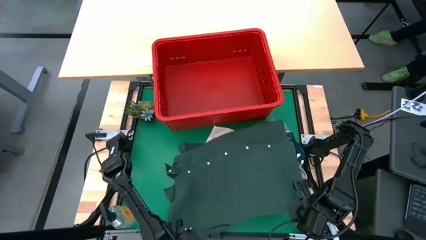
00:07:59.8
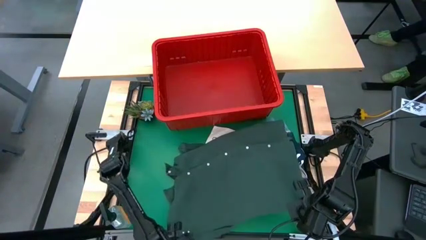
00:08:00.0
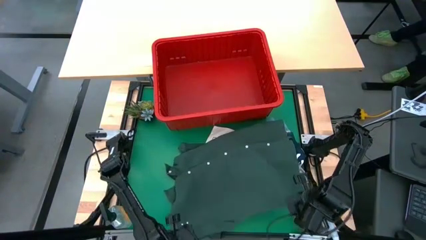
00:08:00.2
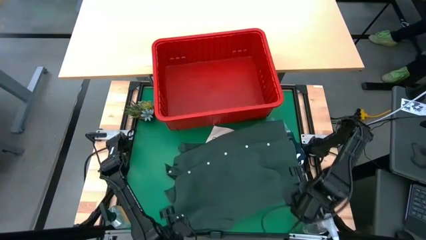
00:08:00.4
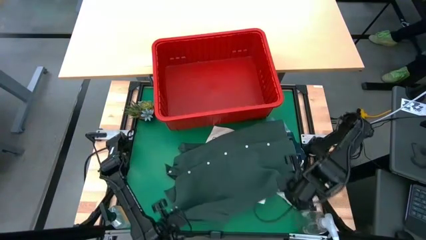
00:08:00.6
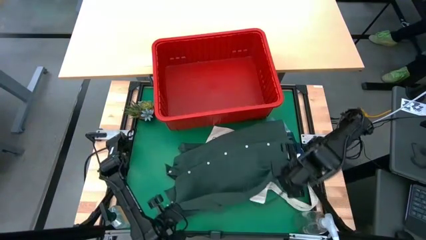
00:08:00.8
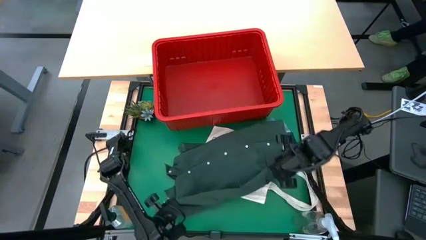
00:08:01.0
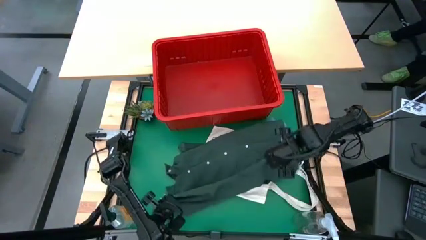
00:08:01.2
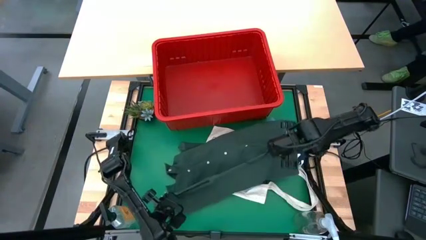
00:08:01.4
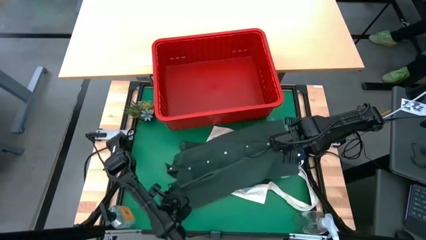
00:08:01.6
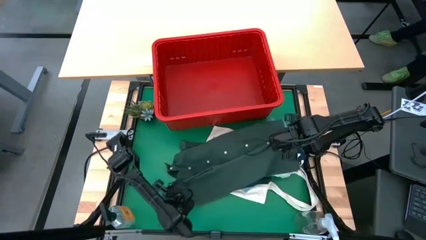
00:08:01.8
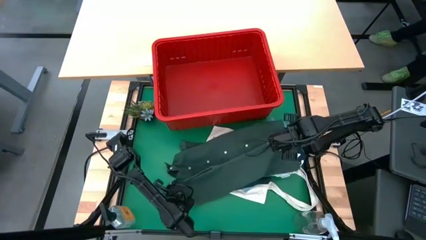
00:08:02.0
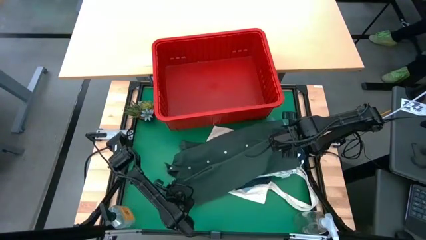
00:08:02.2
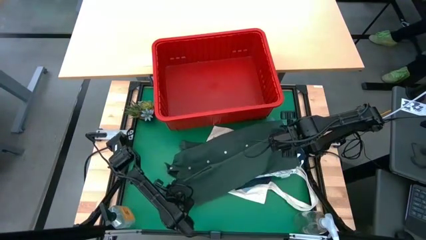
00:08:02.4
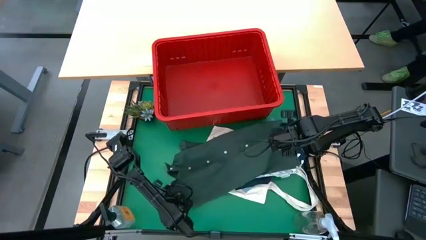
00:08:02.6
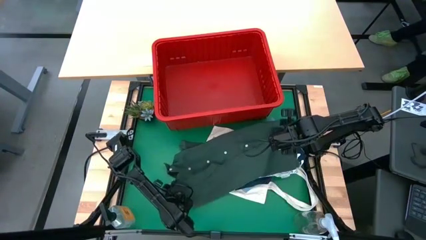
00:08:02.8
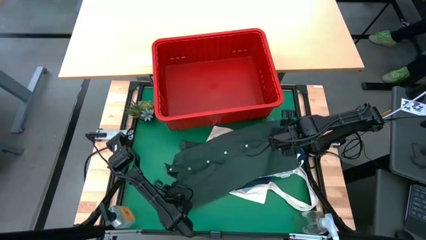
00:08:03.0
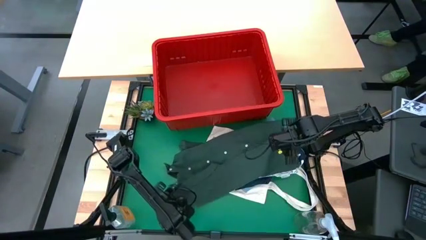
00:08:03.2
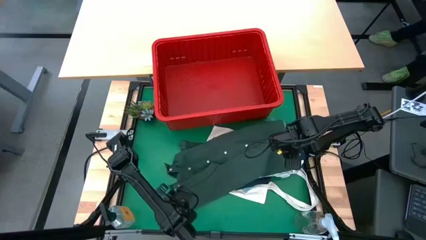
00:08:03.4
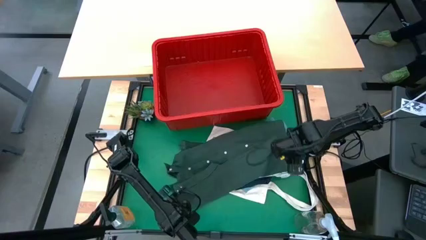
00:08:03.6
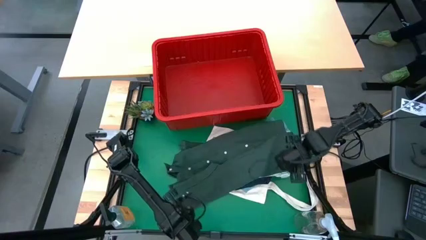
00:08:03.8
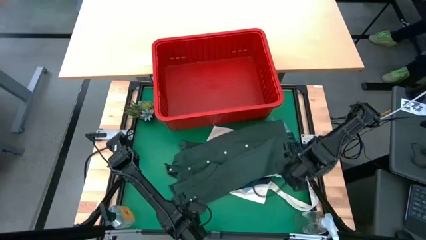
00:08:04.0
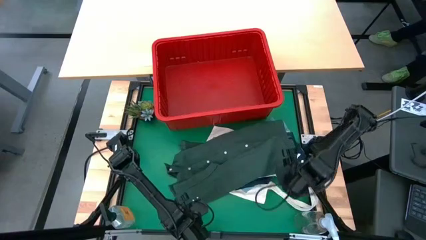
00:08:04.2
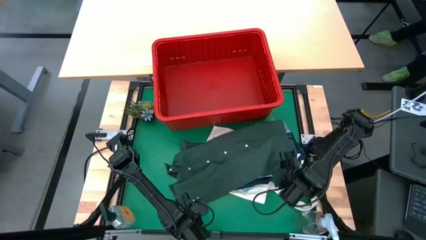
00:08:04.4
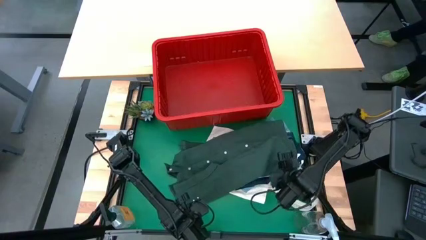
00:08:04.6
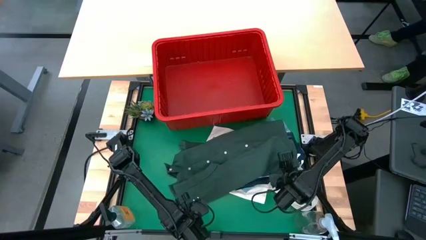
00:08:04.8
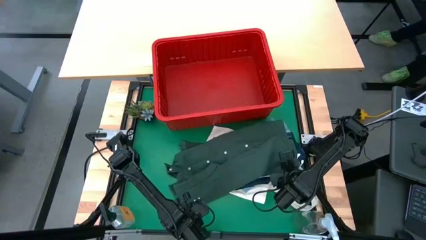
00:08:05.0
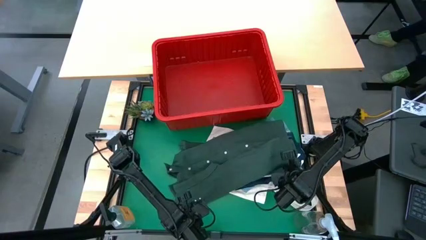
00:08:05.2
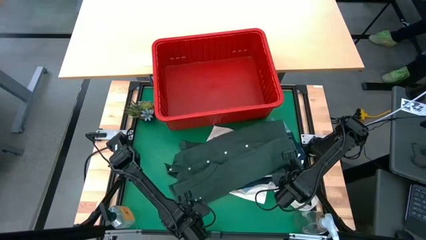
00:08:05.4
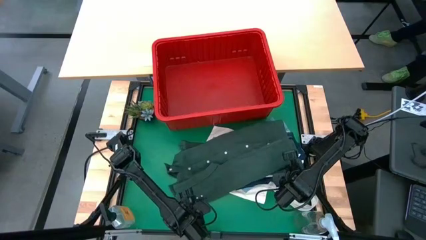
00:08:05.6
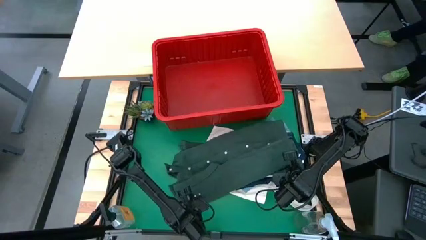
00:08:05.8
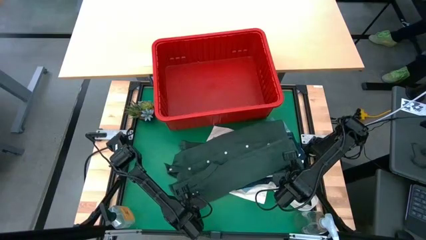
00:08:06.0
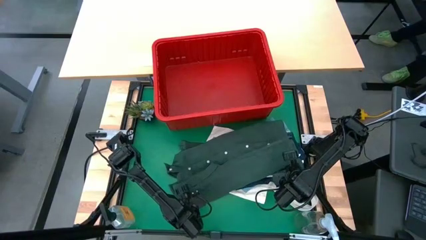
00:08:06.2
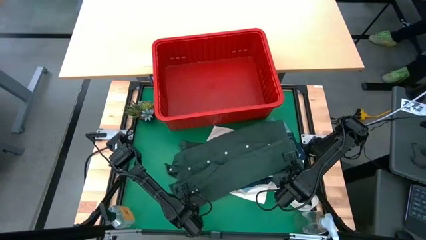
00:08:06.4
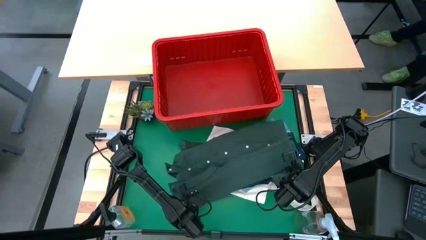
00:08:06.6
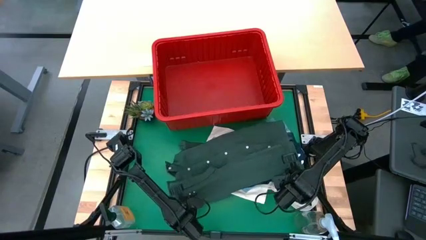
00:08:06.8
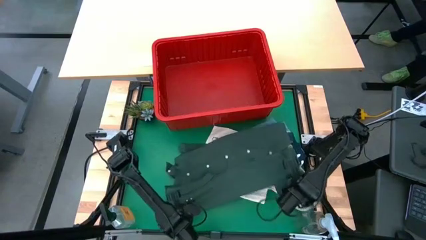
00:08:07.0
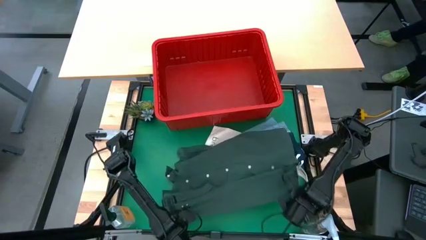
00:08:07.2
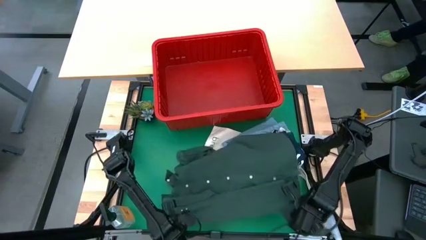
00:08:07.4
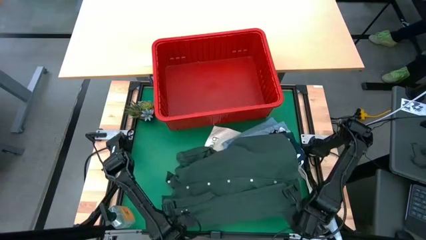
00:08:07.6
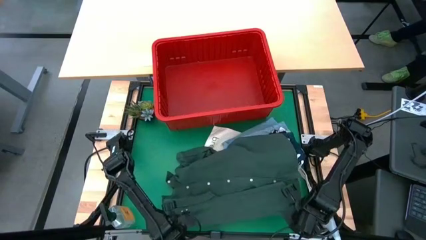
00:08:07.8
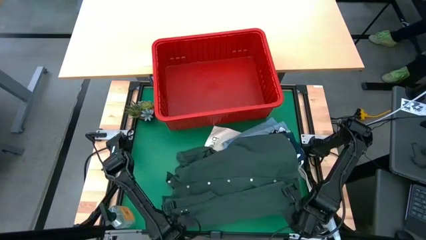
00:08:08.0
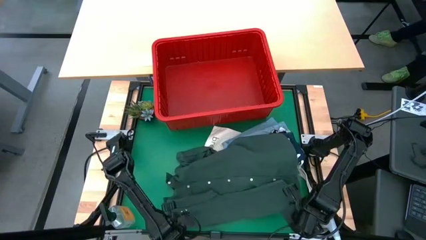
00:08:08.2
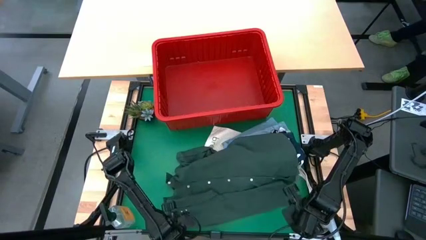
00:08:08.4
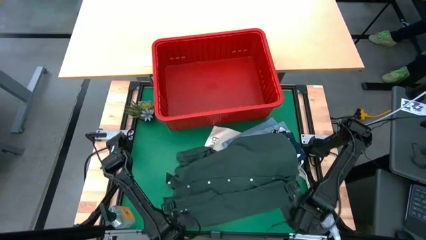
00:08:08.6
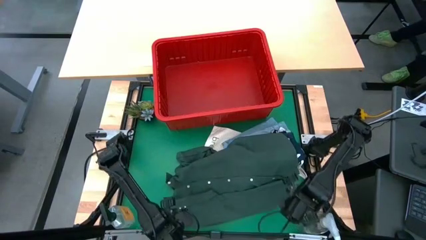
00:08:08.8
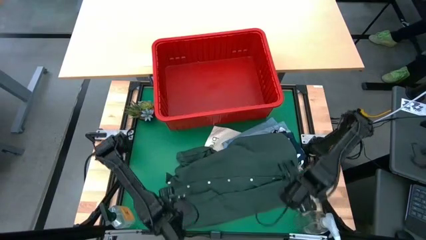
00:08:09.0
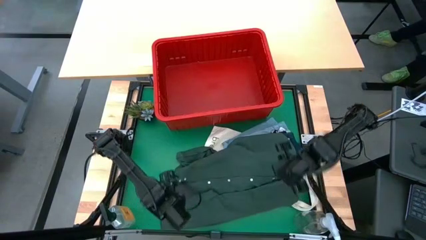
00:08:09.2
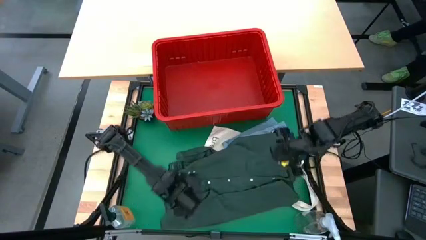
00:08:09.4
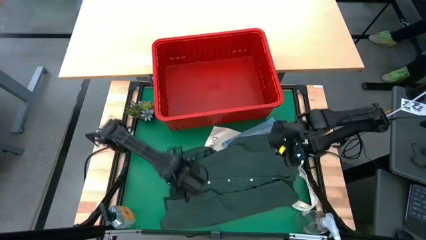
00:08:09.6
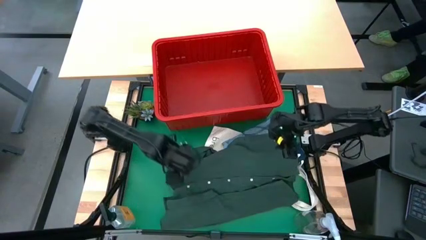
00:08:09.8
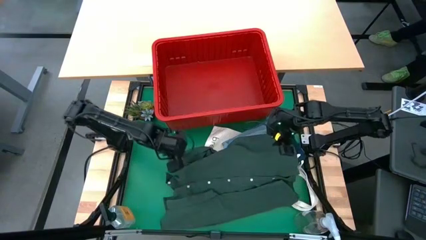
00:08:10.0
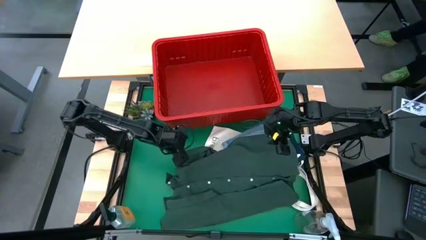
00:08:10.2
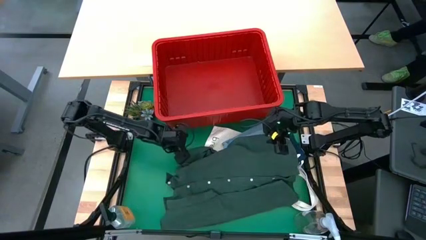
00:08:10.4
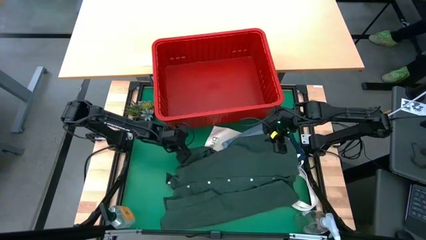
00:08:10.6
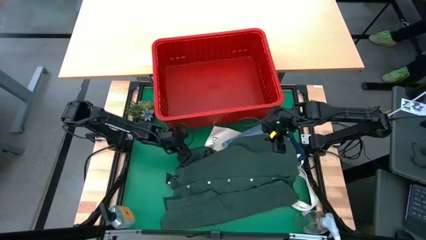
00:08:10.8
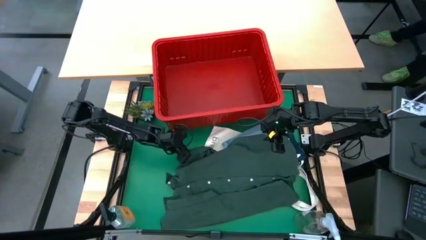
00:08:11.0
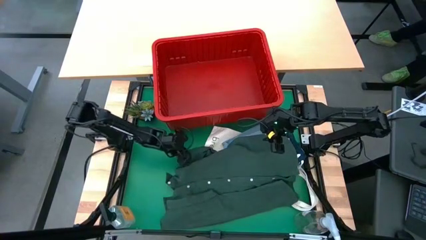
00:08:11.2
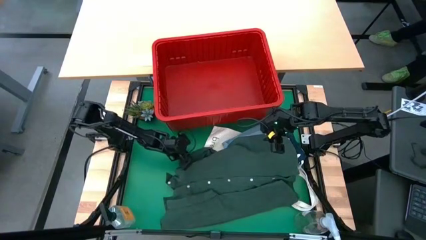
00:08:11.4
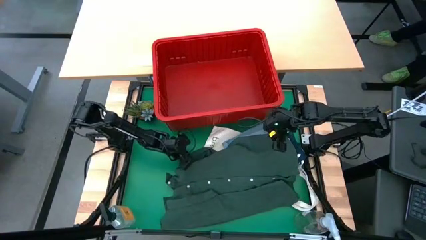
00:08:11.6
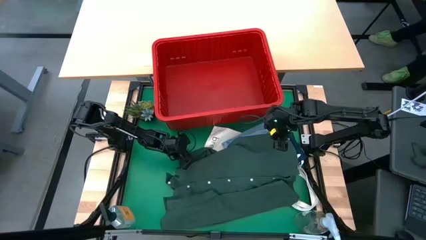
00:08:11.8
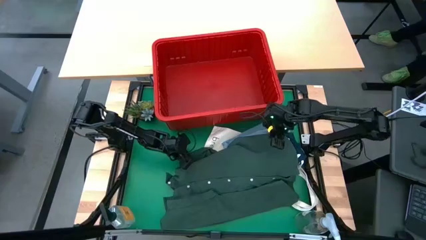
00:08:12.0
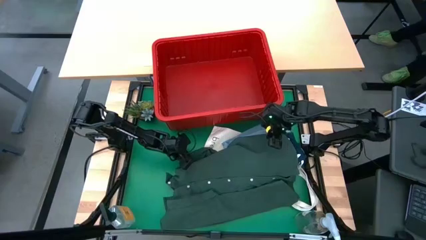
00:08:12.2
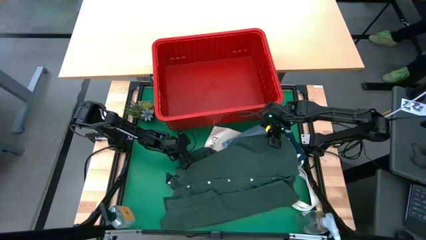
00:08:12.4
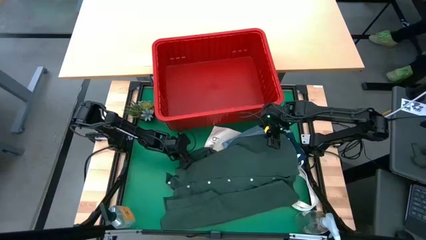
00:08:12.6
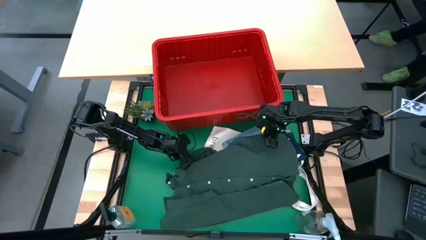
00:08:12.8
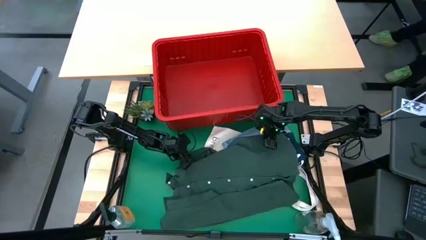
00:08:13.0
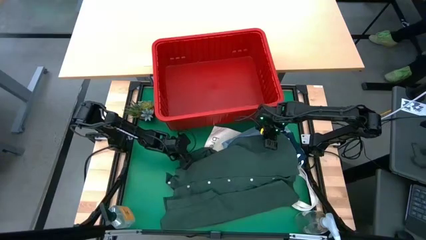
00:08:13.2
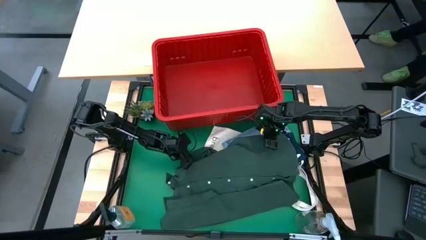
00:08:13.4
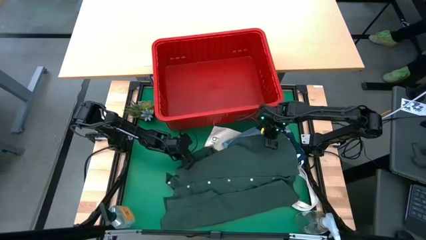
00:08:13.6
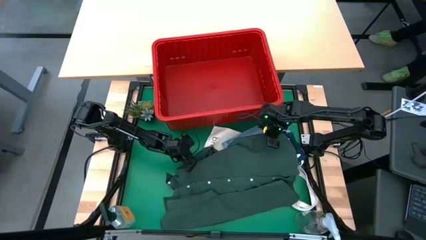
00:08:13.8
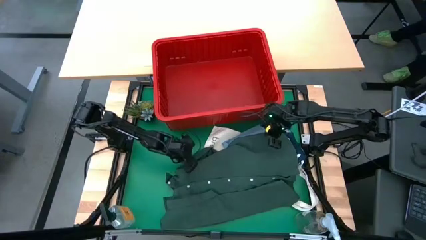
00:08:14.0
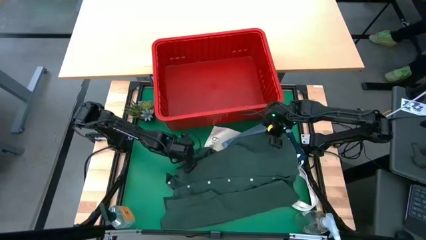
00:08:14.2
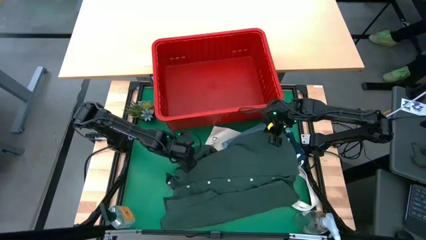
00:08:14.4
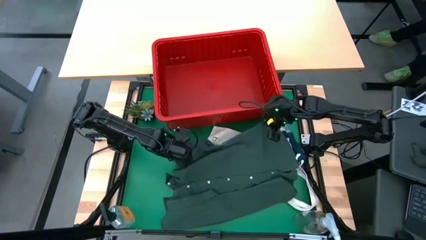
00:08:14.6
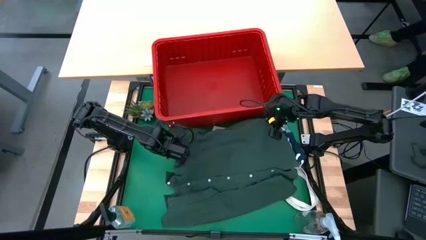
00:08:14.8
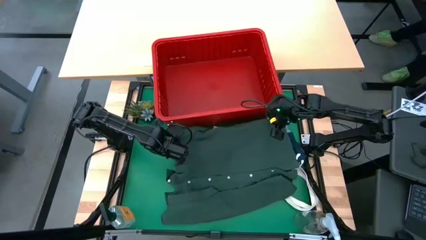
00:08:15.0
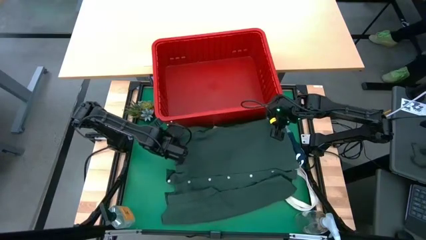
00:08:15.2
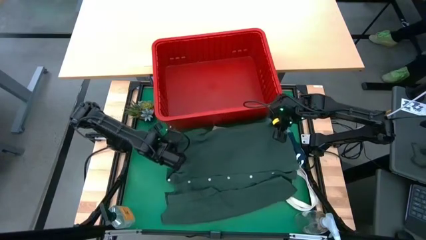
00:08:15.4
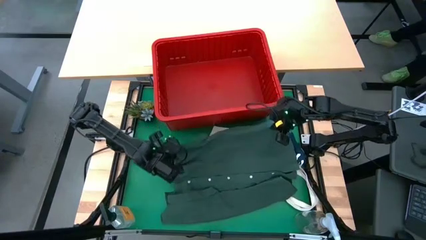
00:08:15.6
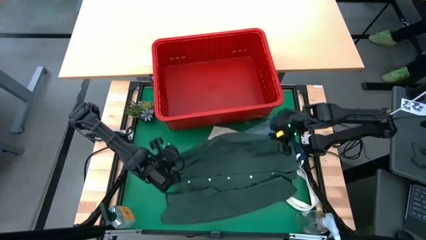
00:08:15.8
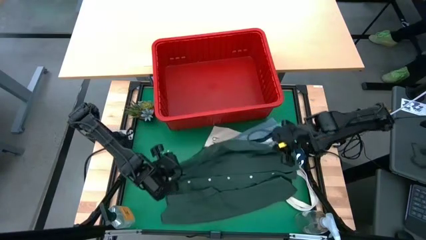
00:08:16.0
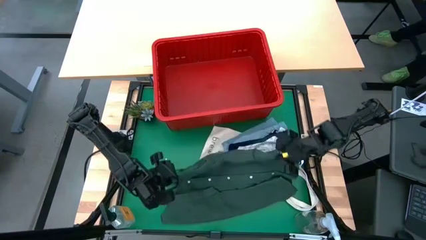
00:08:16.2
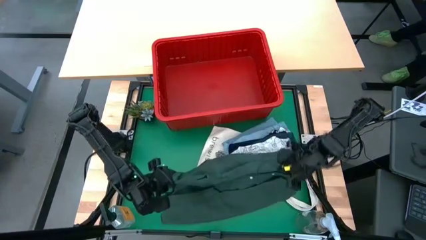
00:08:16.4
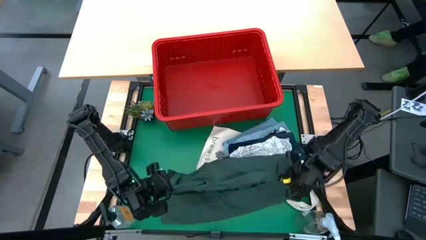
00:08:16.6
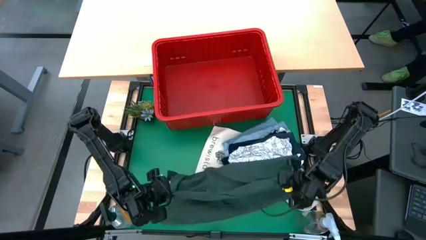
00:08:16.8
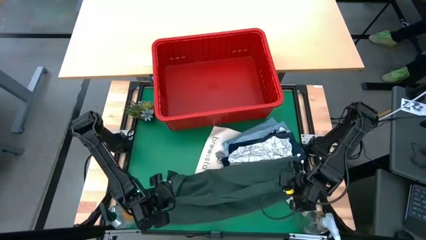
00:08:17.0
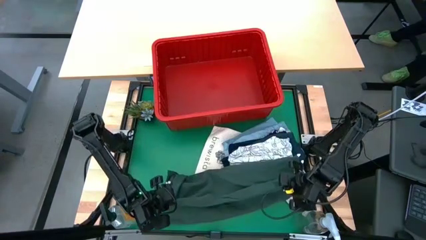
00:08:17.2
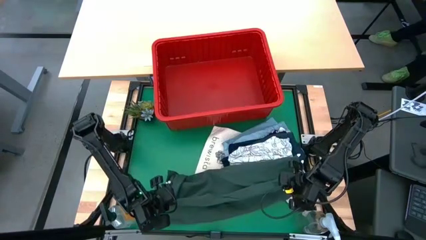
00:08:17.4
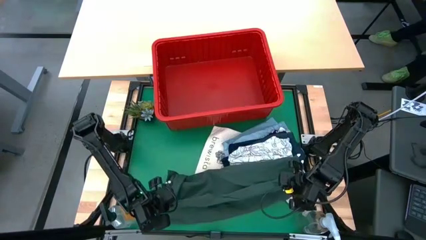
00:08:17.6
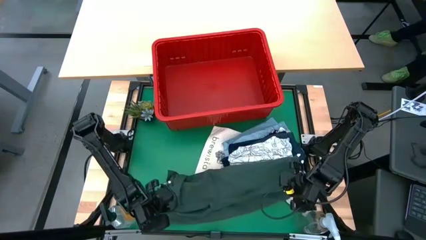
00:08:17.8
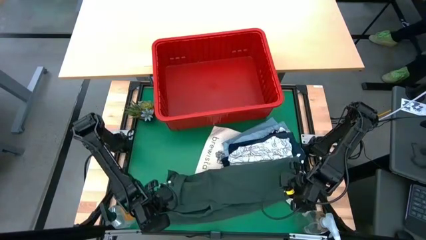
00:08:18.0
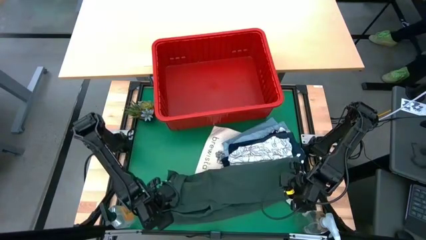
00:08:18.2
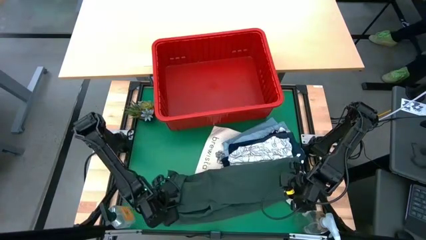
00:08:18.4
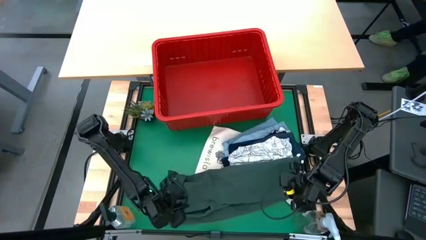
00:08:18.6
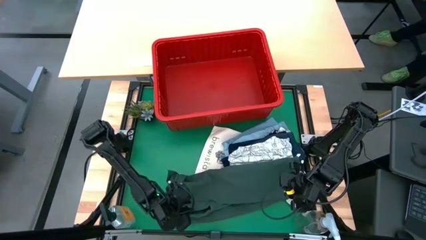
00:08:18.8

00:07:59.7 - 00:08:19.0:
Task: Fold laundry
Fold the patterned white shirt
